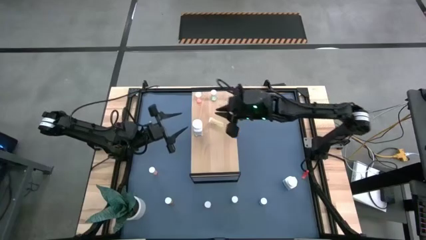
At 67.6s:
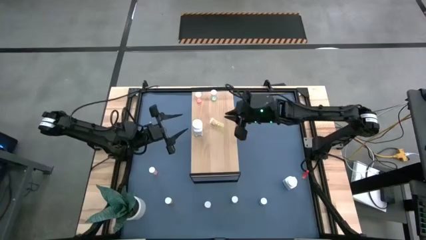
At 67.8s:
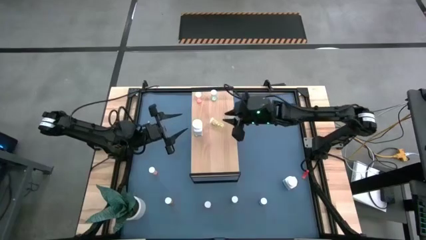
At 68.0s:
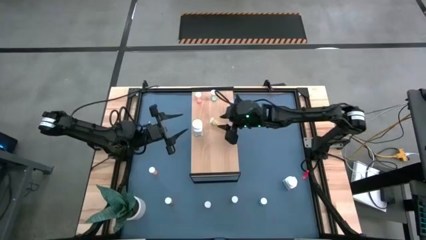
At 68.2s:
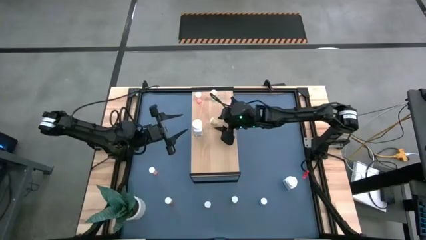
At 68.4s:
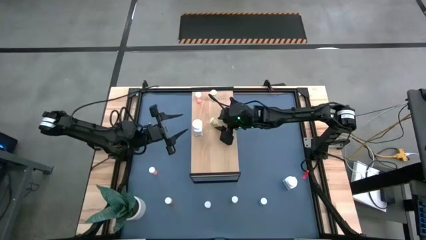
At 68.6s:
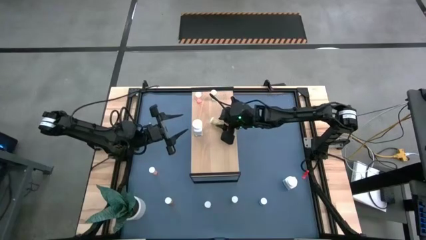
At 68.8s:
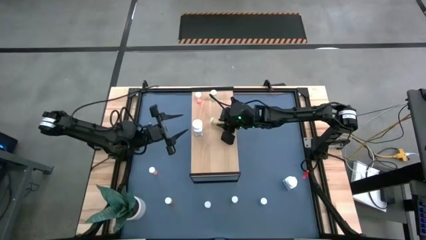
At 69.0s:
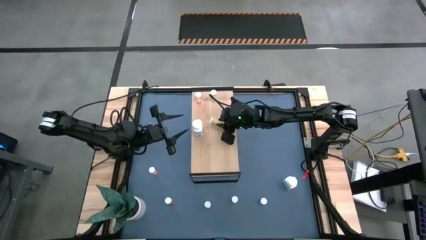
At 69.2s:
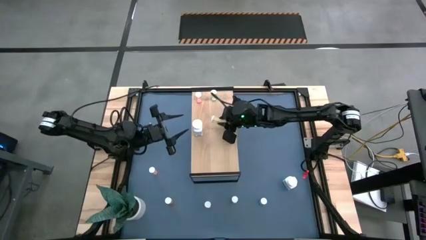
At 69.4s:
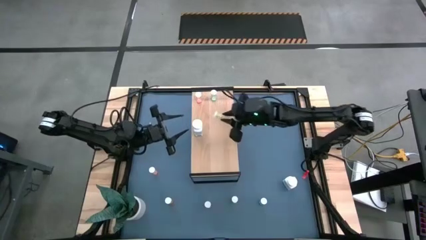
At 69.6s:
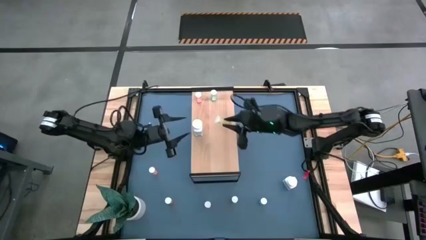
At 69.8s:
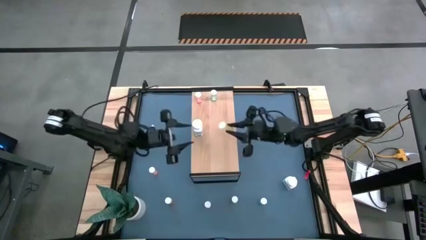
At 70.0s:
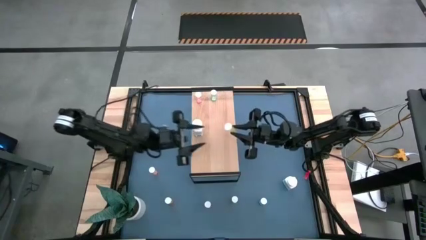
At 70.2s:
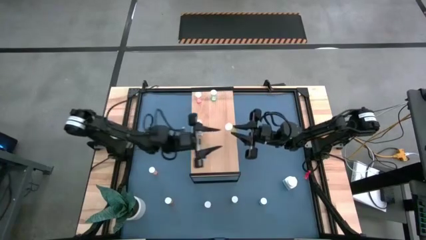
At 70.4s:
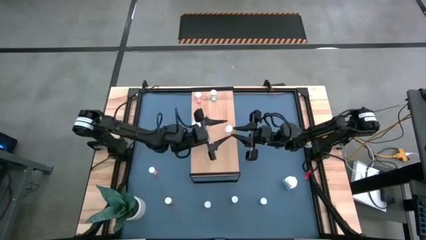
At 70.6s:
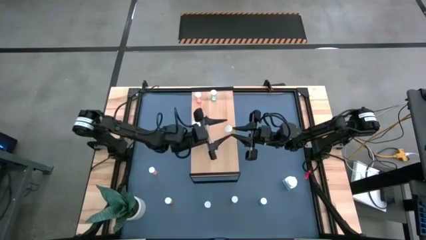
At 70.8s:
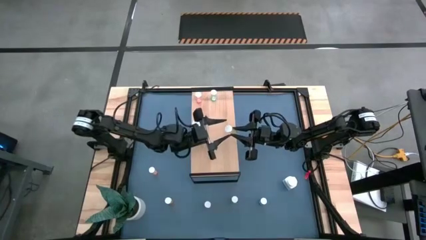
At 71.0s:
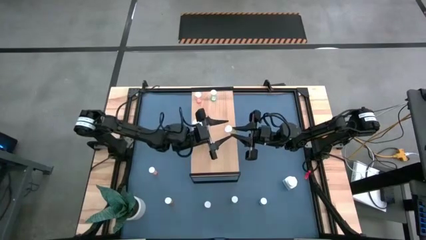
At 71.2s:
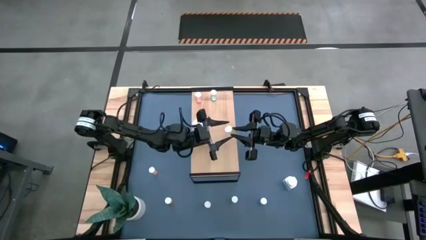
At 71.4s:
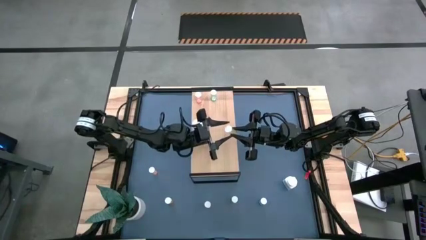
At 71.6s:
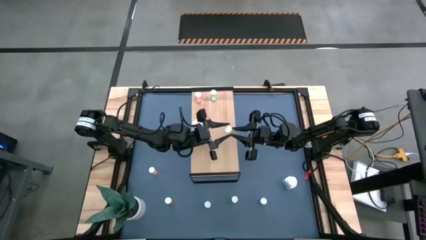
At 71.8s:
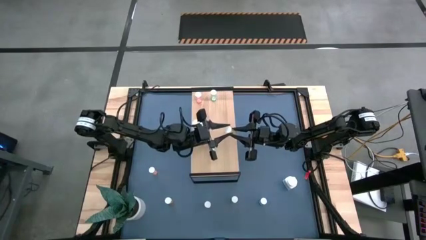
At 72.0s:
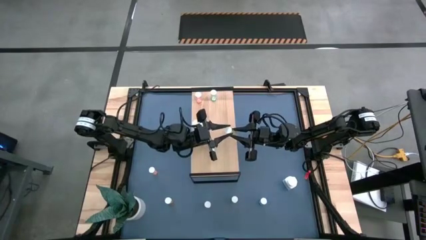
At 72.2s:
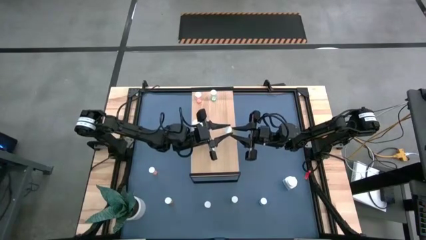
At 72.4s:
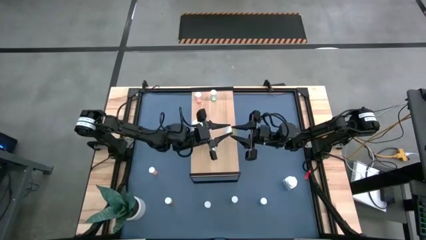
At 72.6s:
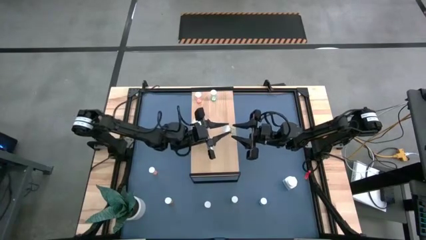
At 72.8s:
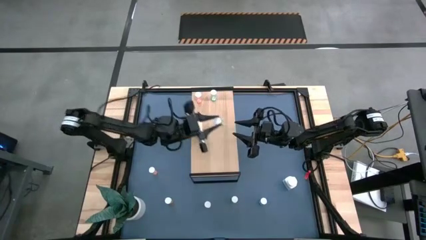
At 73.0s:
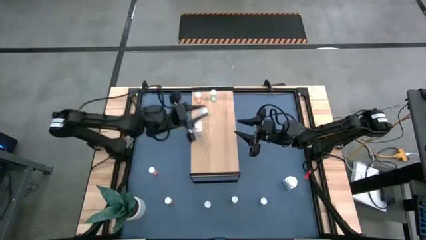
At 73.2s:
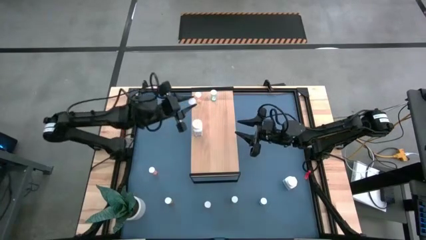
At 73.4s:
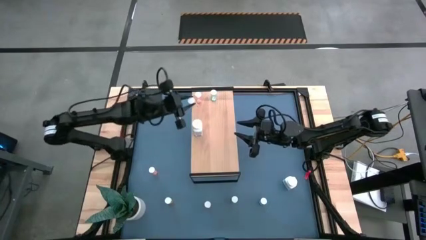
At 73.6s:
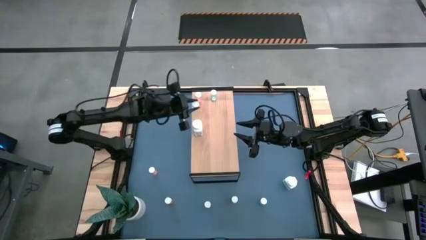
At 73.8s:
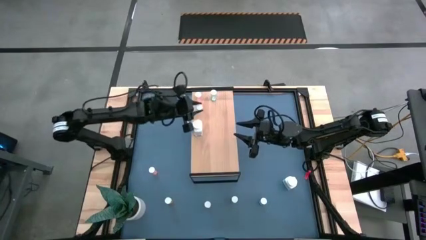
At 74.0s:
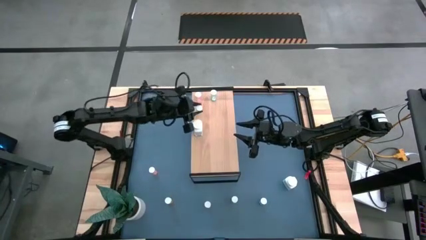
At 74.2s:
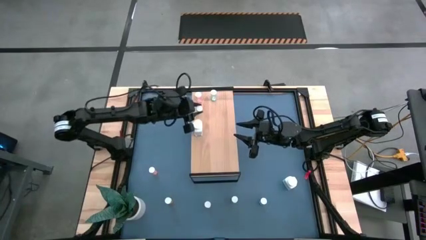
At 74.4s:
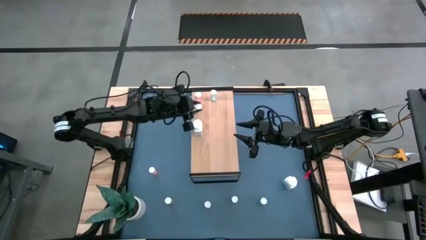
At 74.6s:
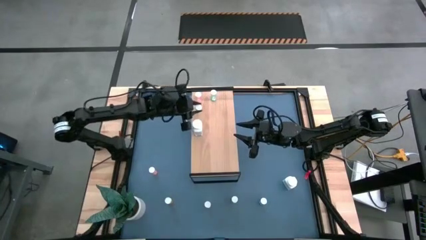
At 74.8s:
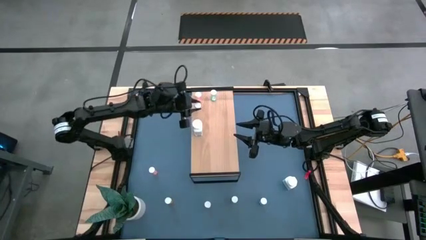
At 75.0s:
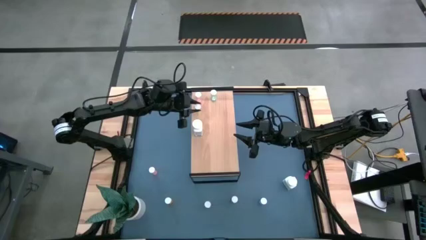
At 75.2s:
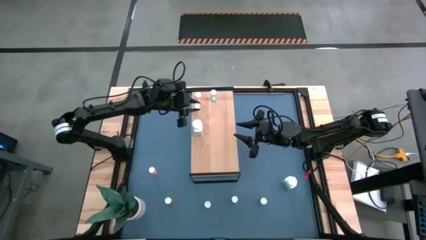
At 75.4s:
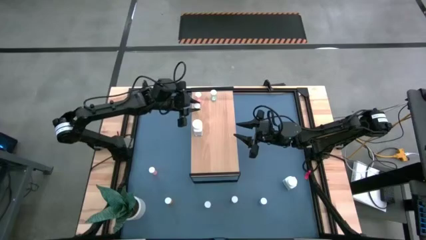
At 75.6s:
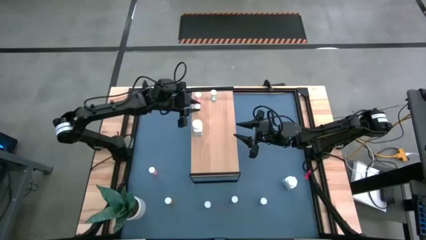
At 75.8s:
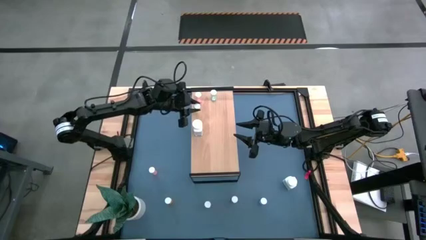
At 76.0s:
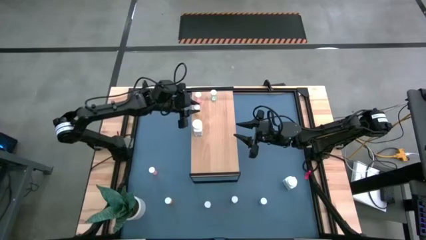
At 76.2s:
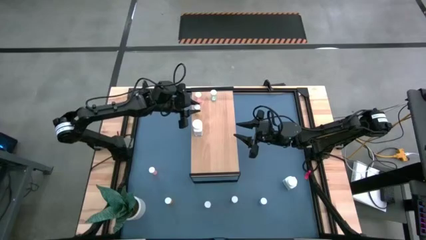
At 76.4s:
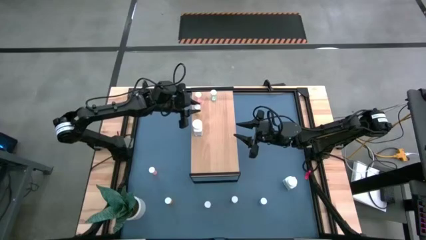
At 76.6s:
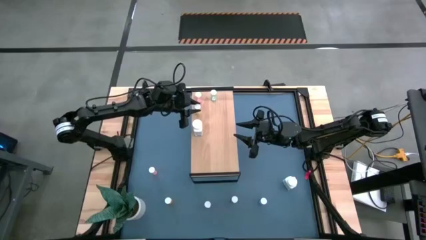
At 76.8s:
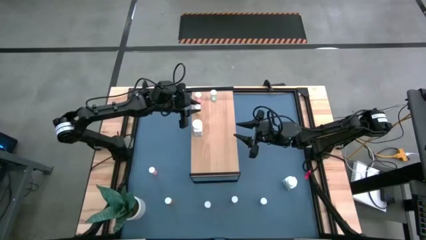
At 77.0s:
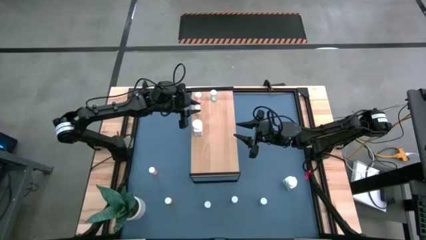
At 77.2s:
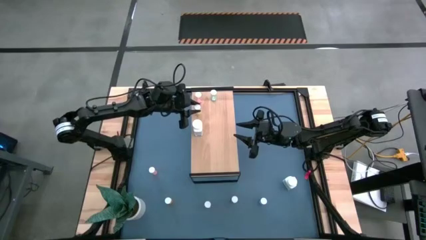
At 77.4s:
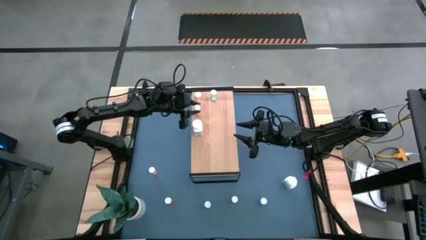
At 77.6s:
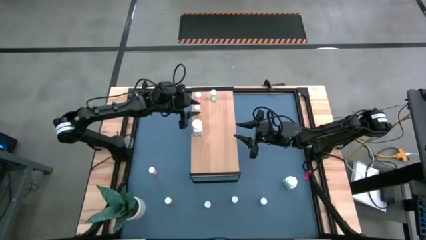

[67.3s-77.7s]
Task: Pick and place medicine bottles onto shelf by color
Put the yellow pill bottle on the shelf

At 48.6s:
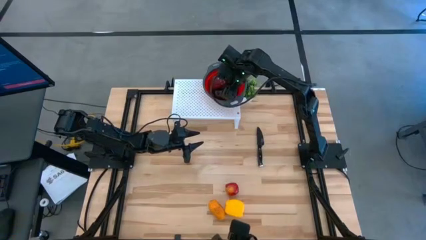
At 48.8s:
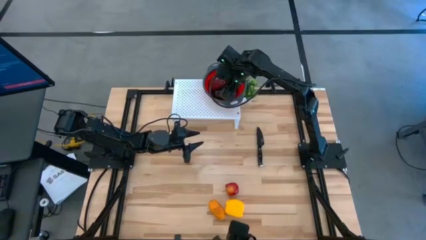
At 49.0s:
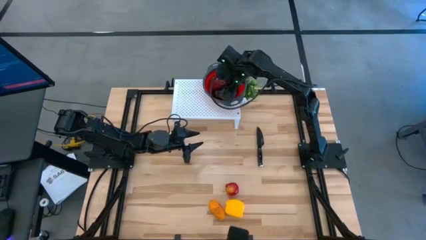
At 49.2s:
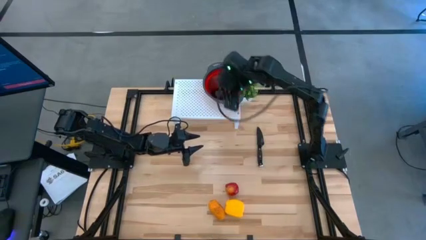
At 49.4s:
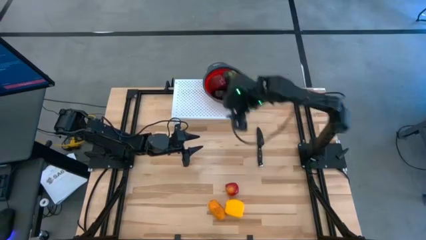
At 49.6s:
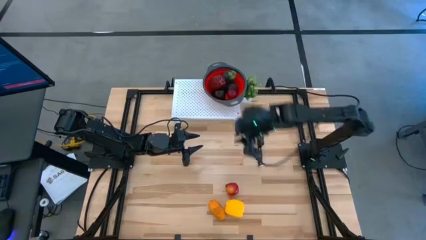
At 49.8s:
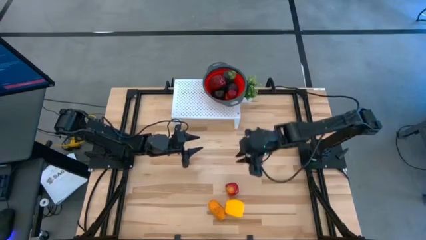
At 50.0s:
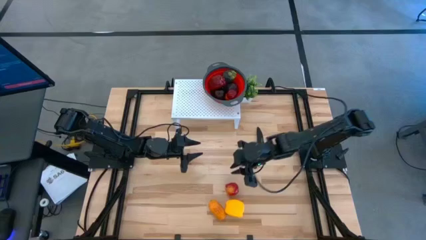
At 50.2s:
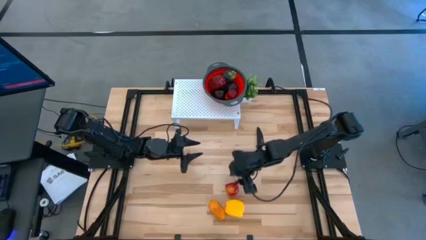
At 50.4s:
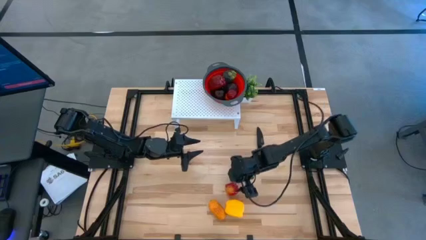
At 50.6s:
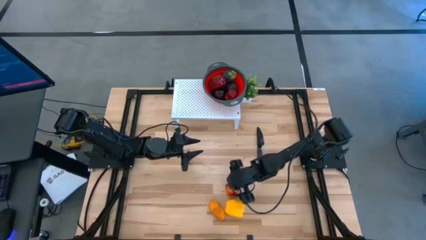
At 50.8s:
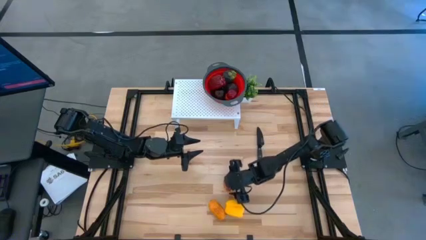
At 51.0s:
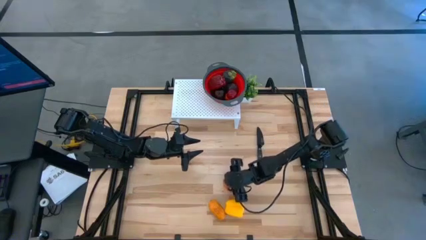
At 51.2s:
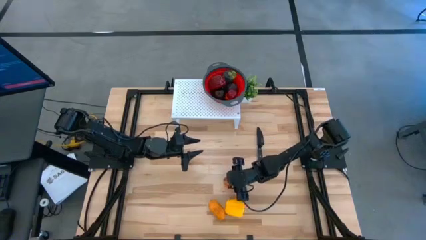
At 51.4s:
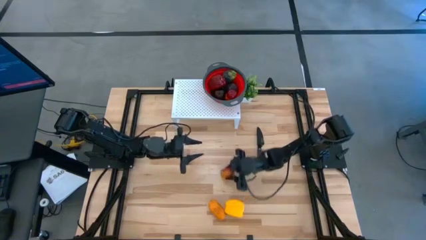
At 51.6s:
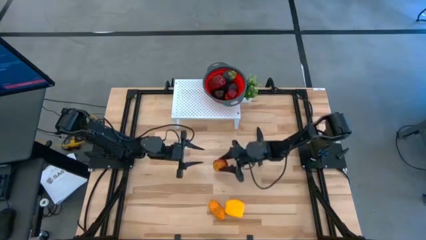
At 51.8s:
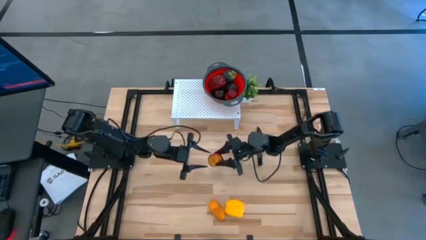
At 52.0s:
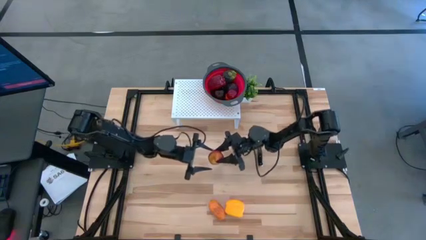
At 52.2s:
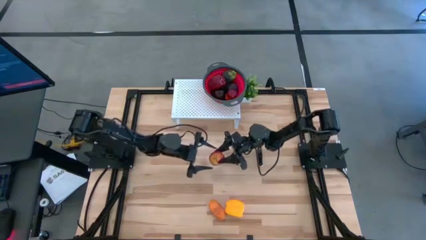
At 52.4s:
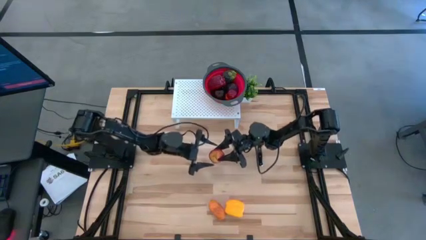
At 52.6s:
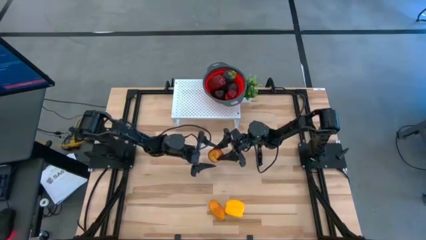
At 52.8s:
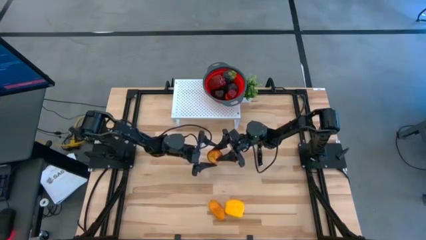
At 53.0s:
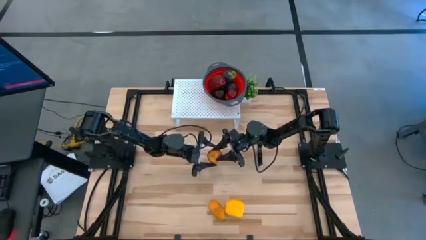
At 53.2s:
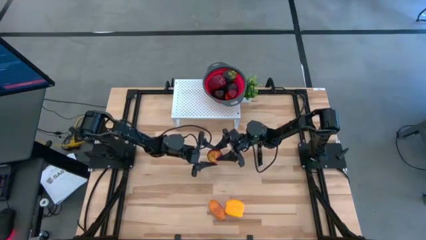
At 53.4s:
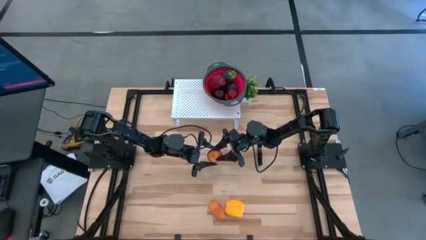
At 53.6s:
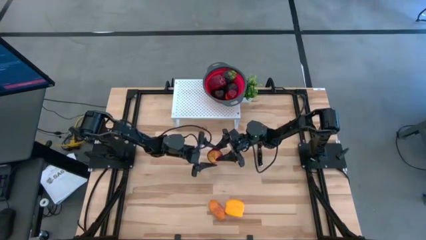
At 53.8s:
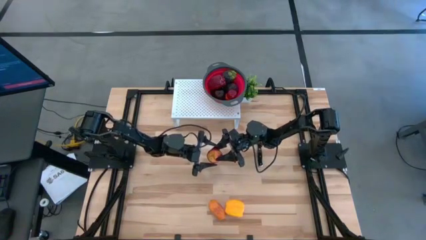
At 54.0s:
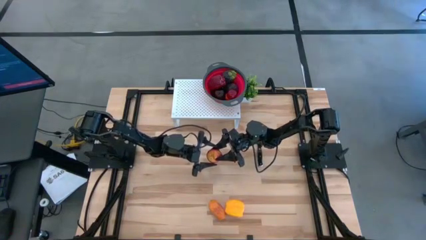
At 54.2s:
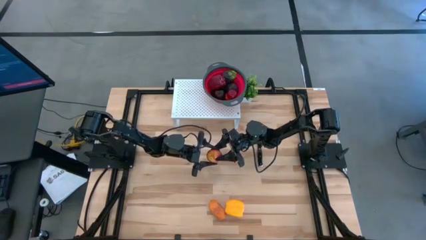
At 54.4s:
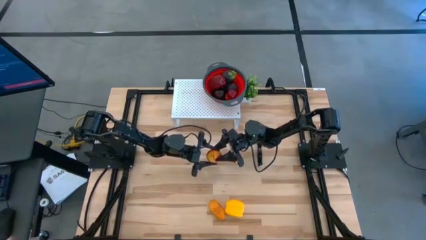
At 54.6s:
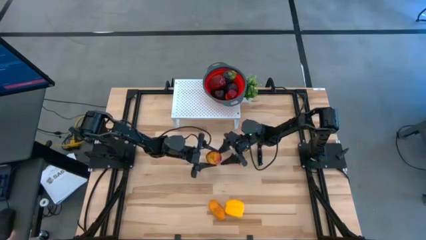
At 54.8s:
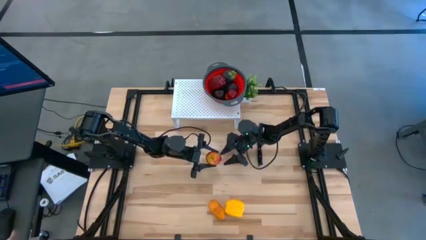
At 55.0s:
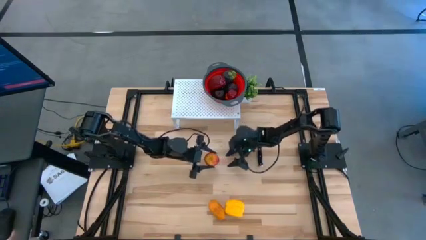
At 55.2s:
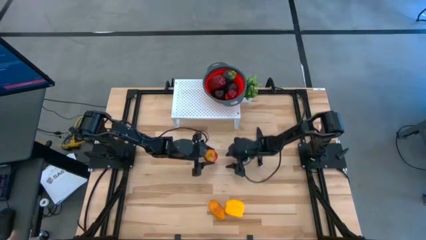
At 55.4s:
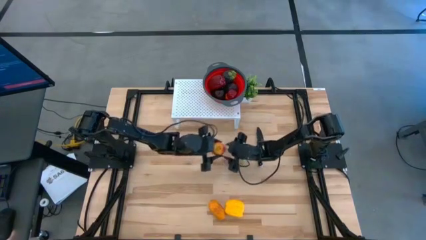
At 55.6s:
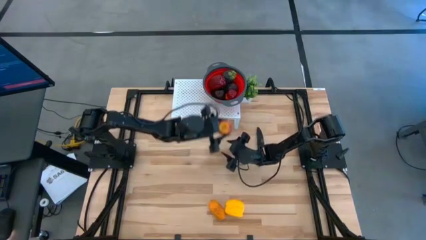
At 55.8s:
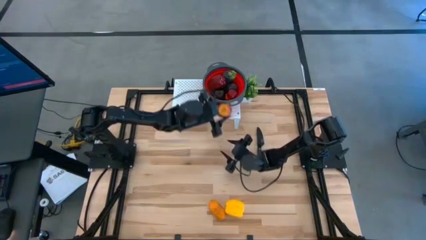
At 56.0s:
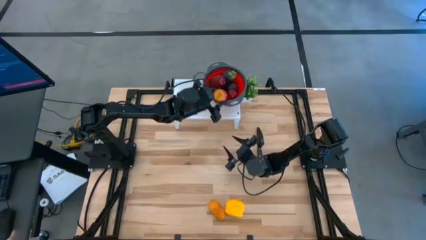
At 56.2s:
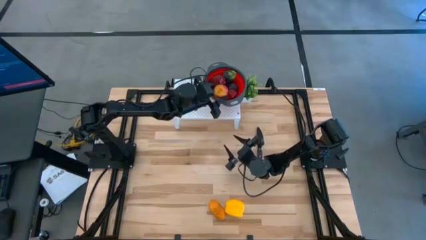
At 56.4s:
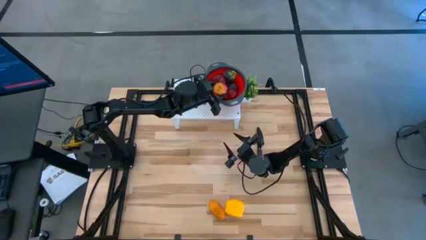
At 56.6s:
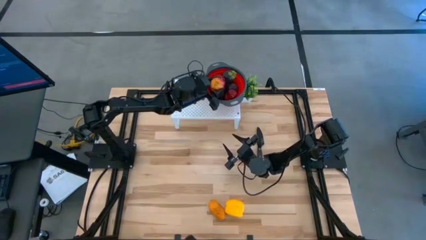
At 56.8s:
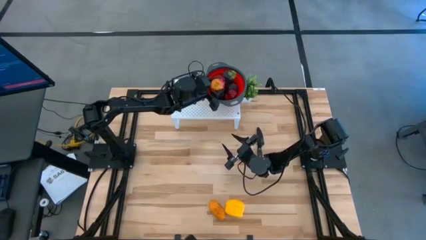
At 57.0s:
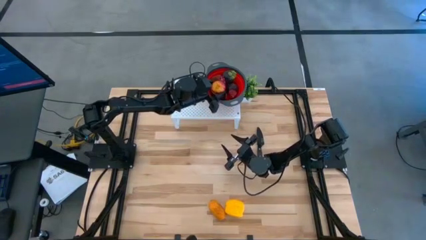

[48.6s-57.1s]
Task: Pick & Place Fruit
Put the red apple into the red strainer bowl
